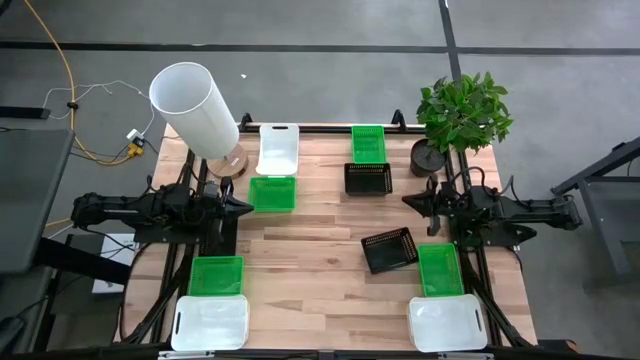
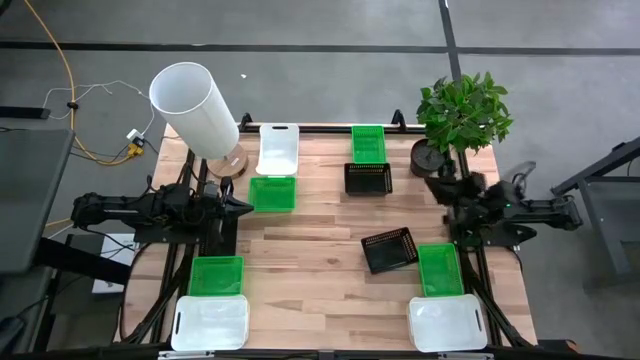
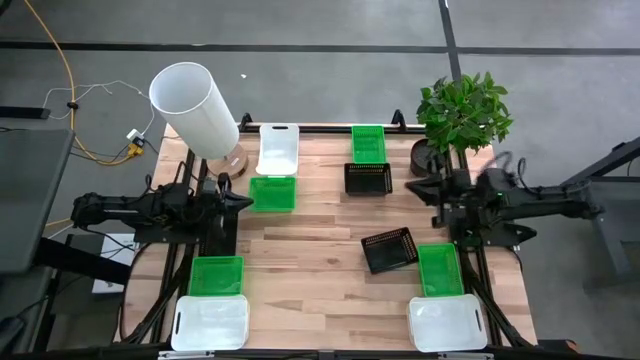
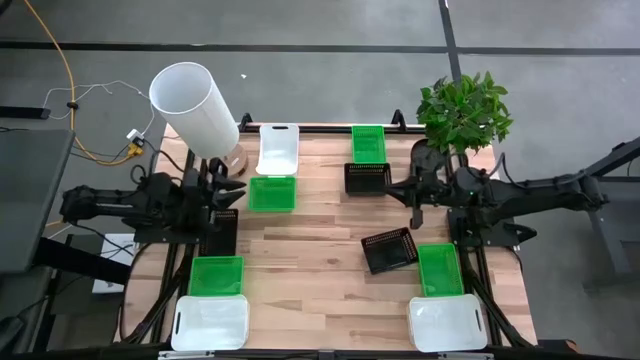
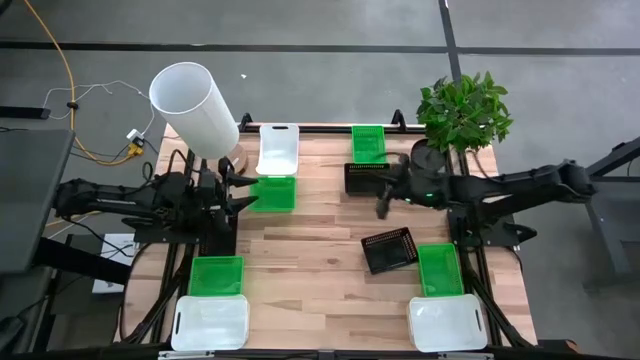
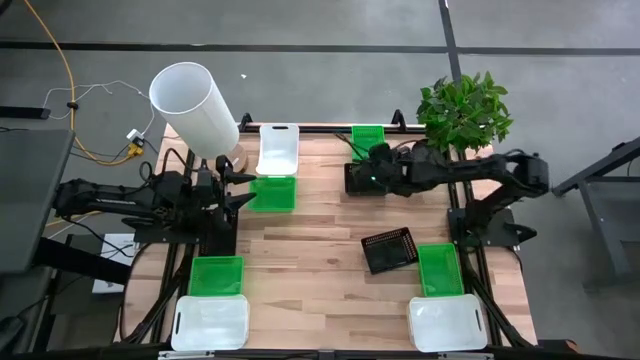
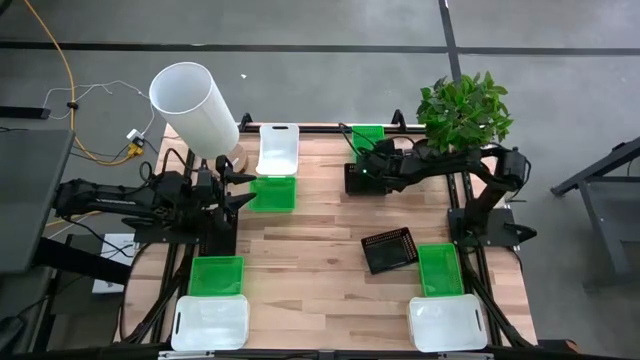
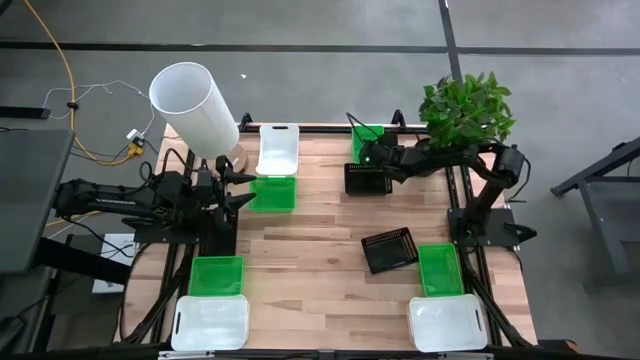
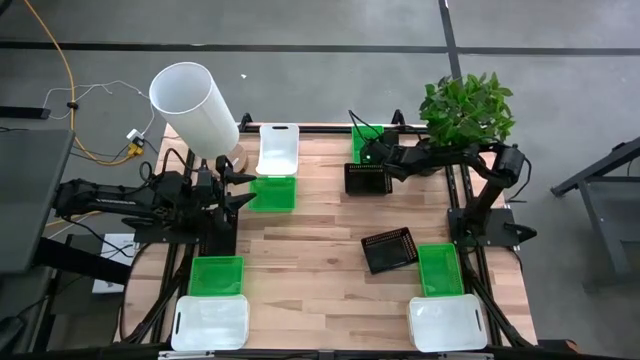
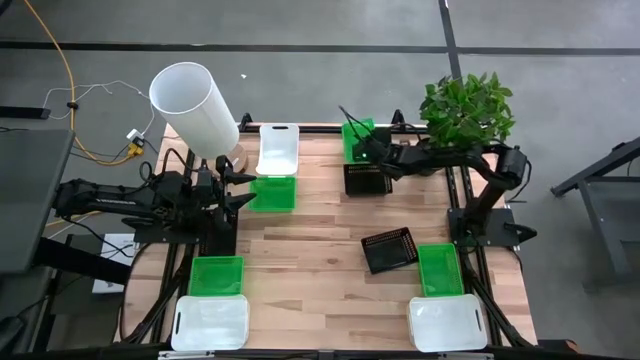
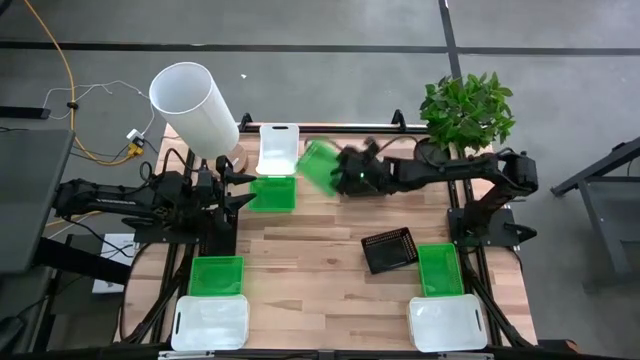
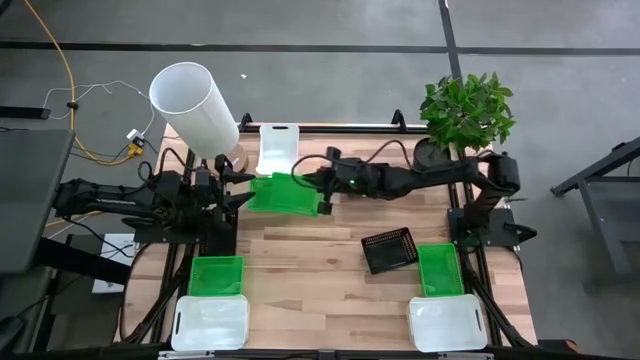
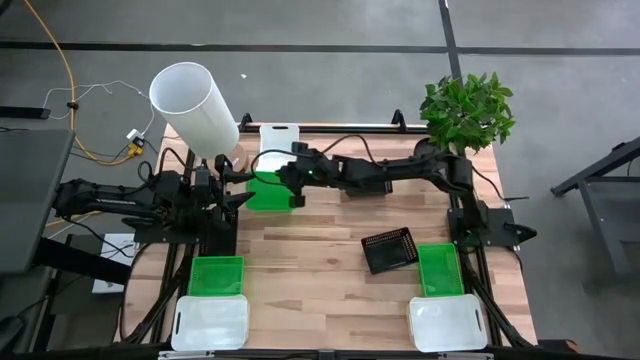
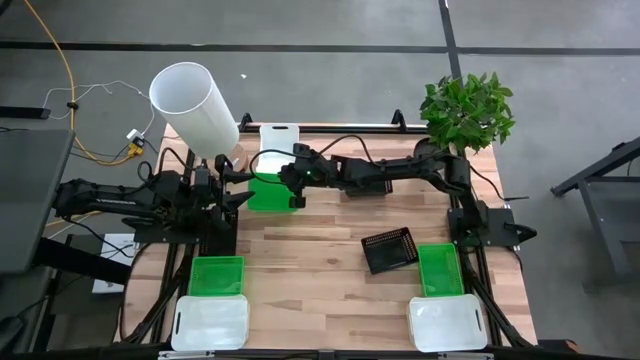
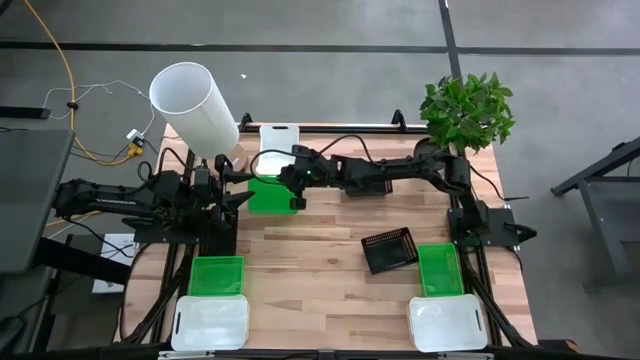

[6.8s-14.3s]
Stack the top green bin on the center-left green bin

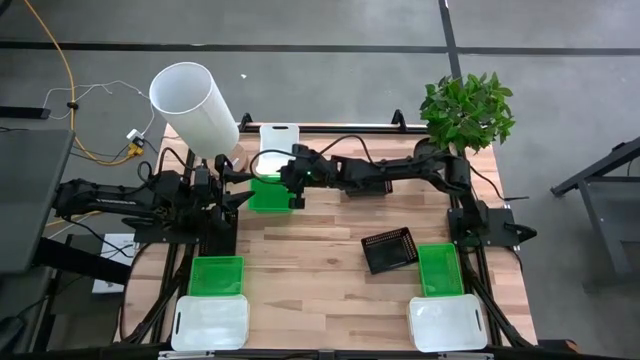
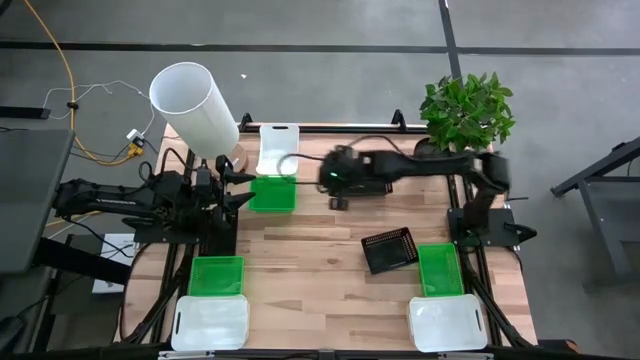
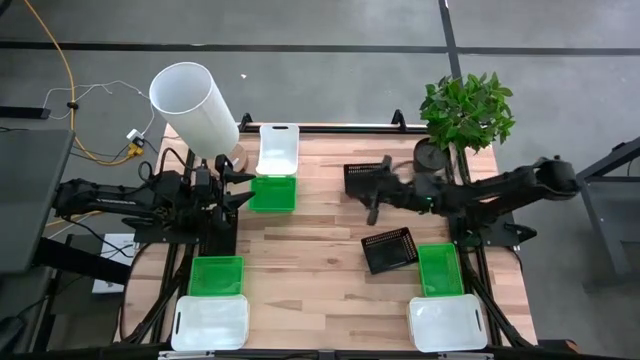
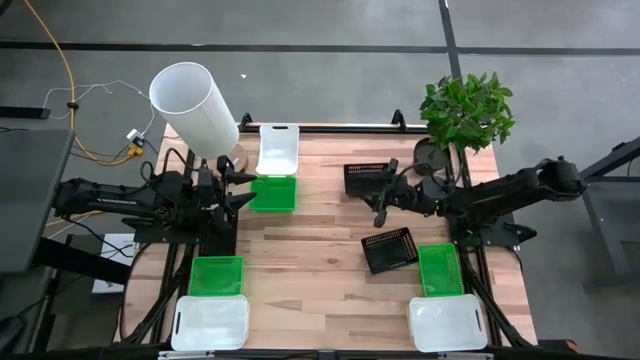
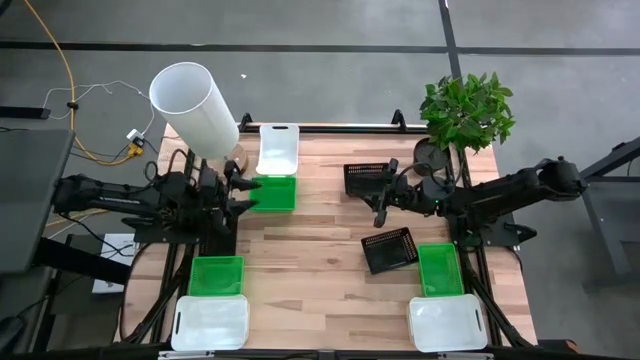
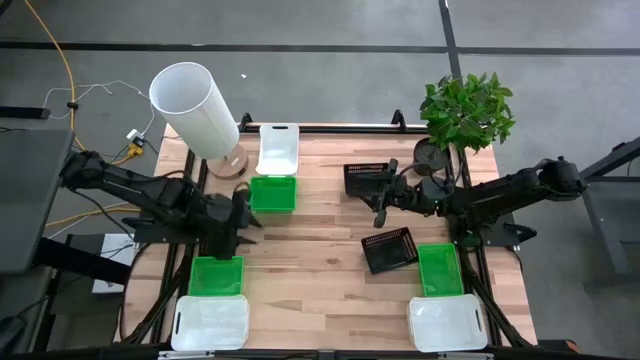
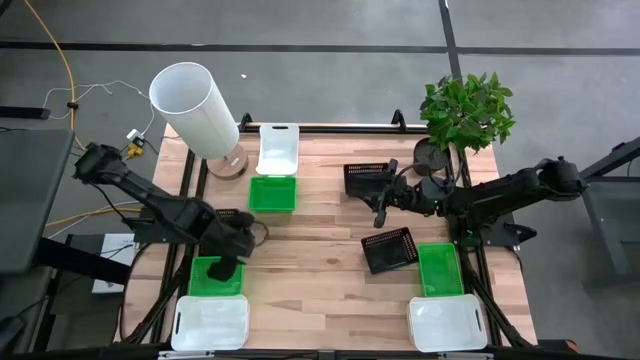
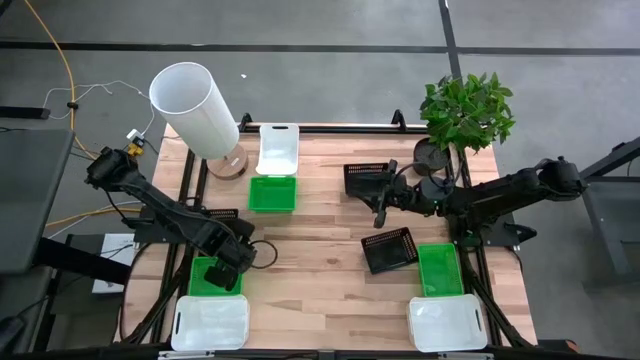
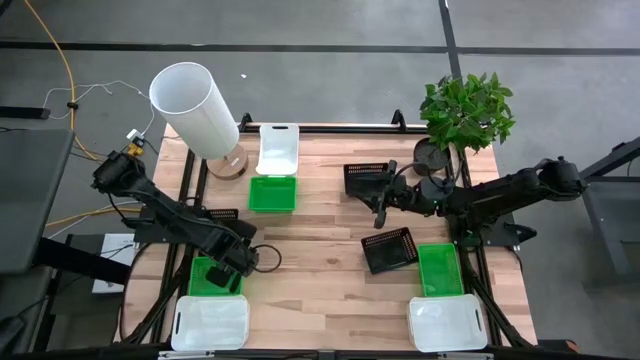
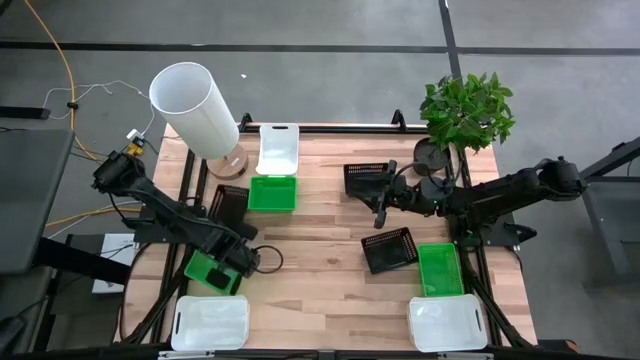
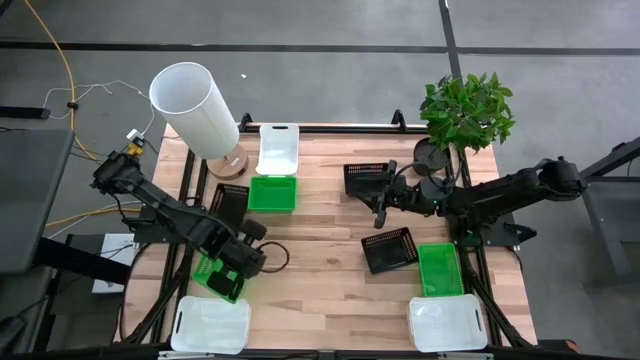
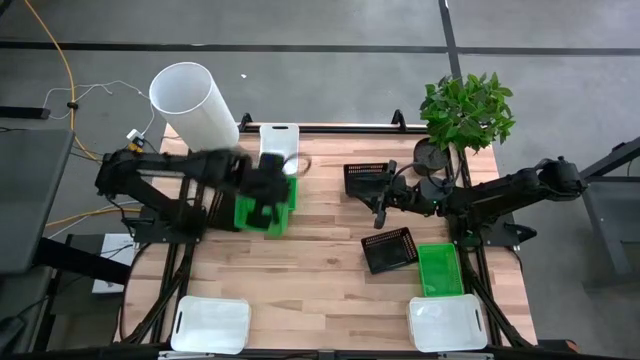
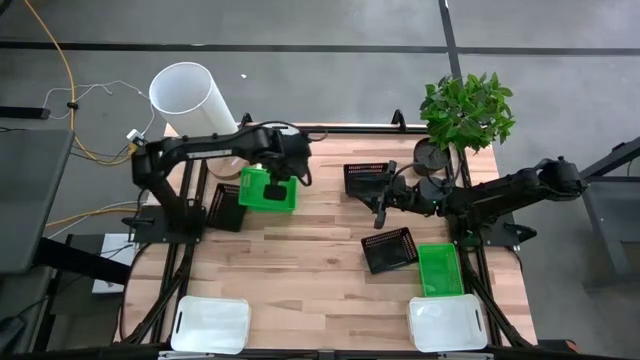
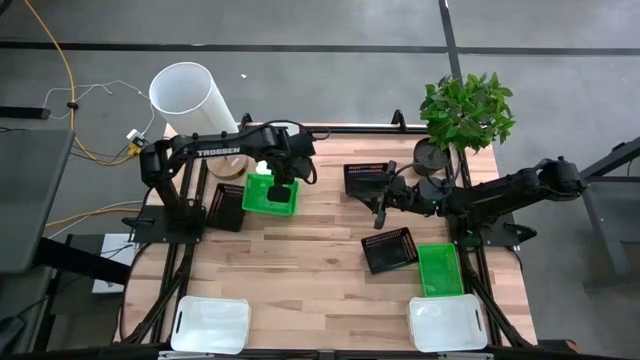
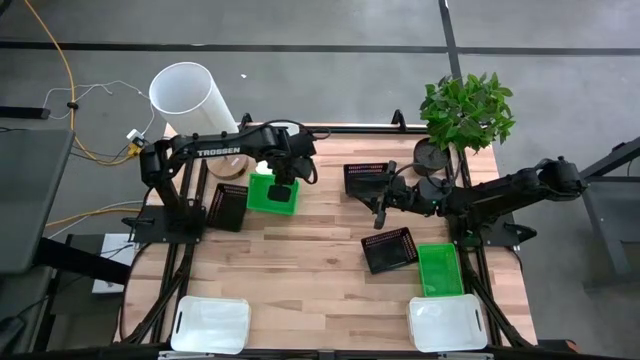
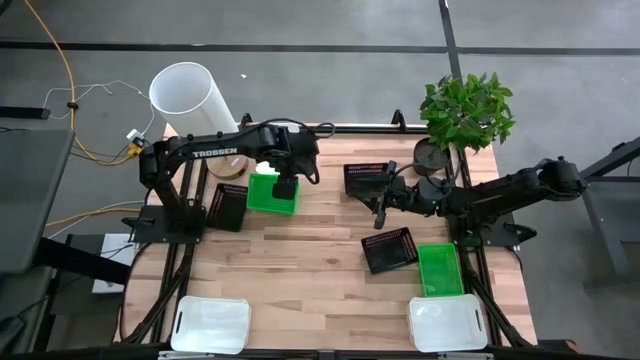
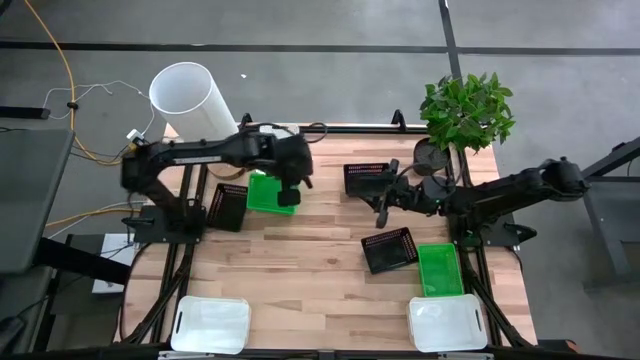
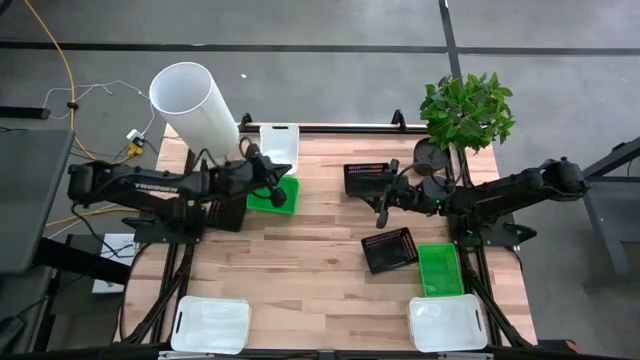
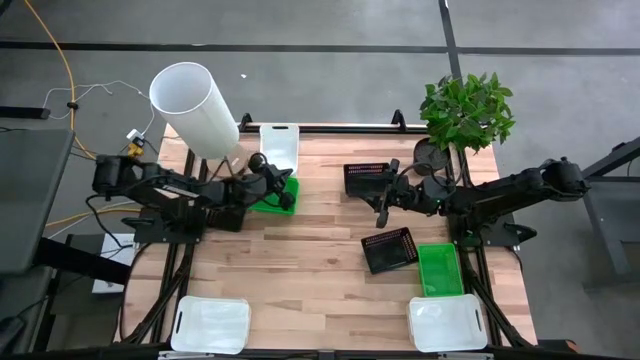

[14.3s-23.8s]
Stack the bottom-left green bin on the top green bin

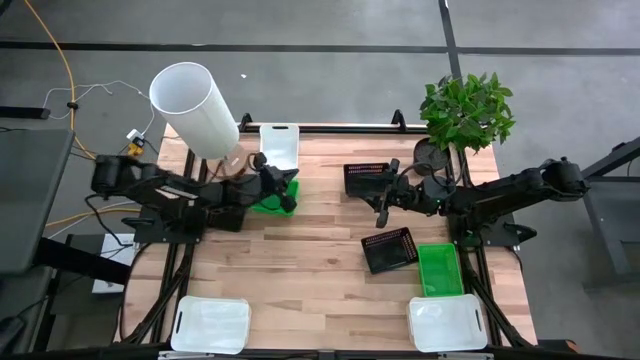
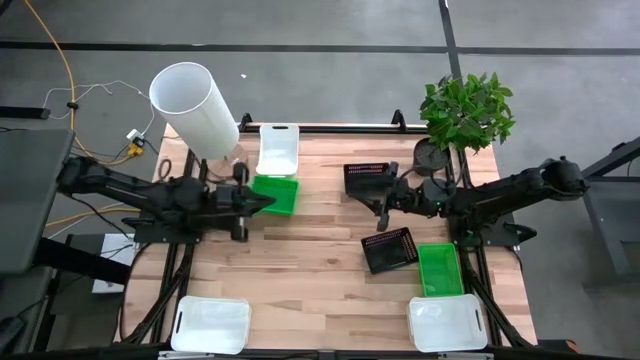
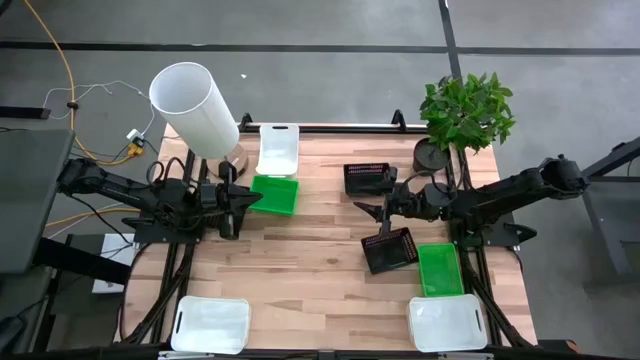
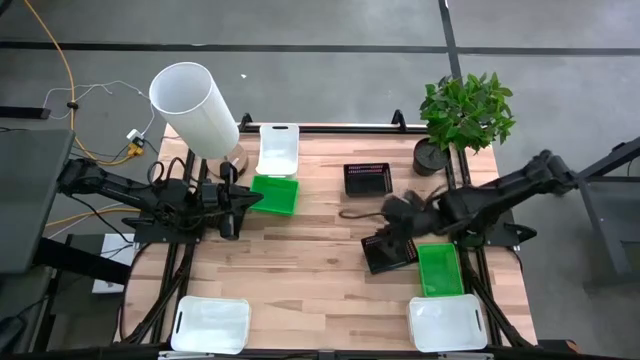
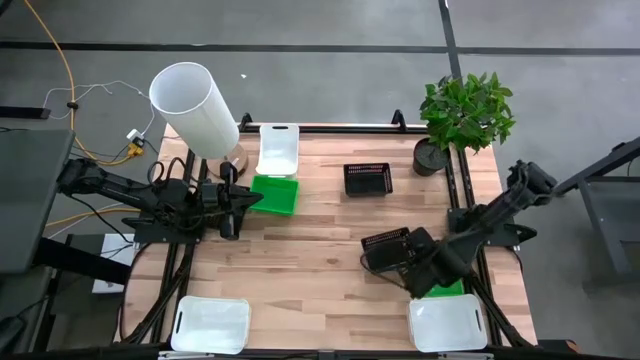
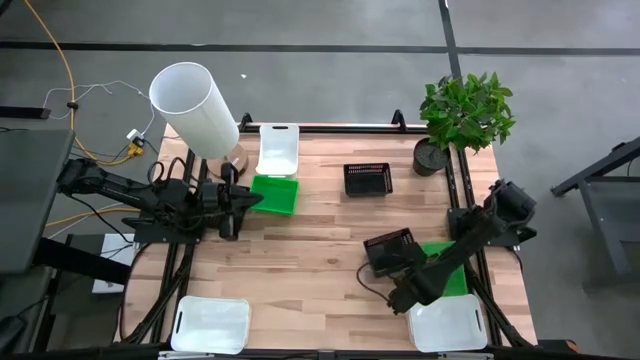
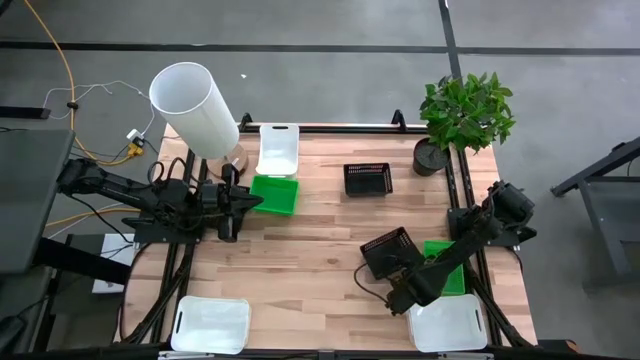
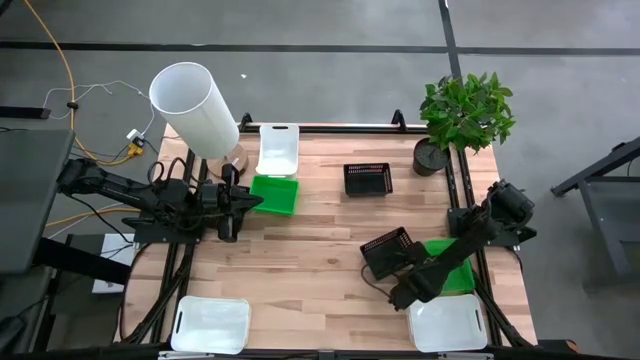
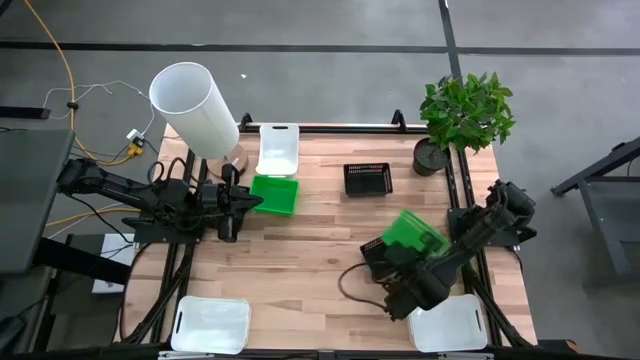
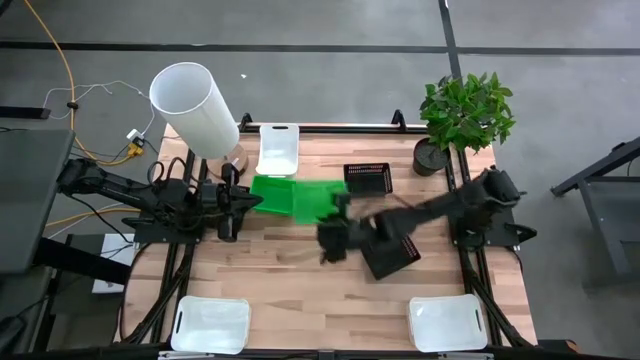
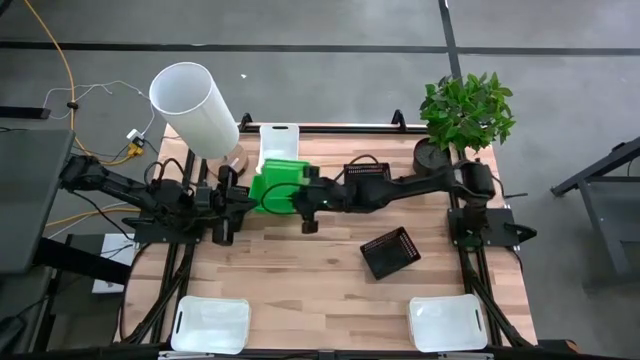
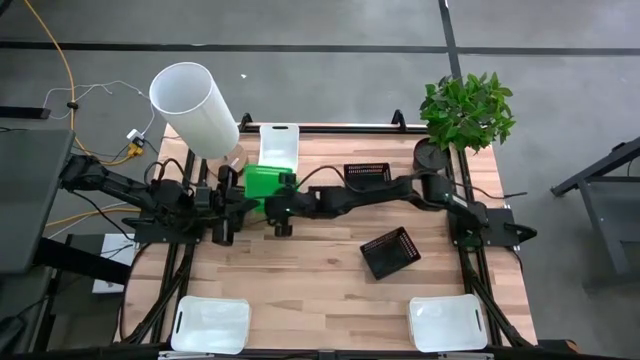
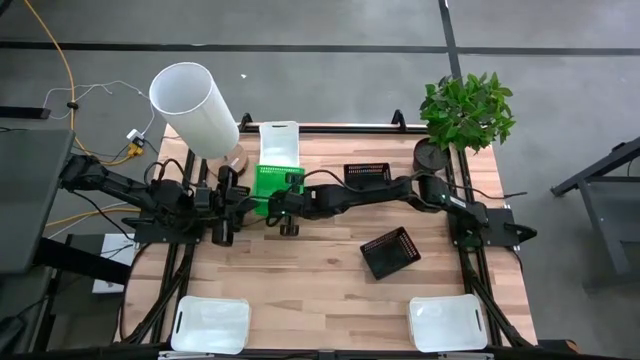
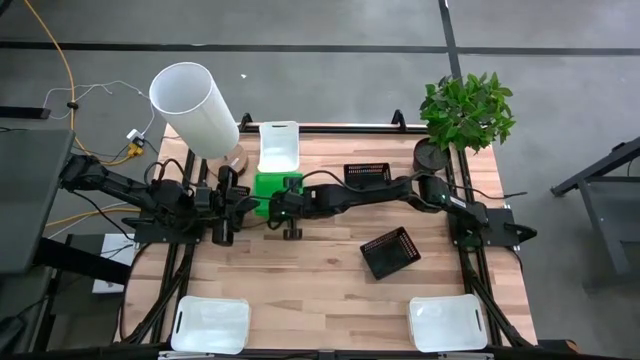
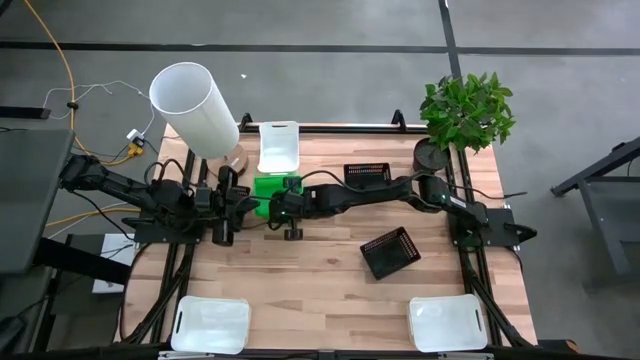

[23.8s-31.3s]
Stack the right green bin on the green bin
